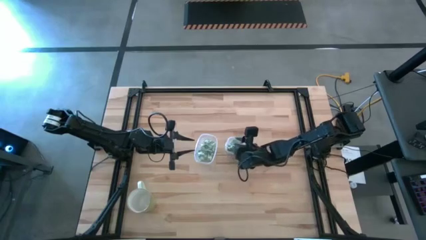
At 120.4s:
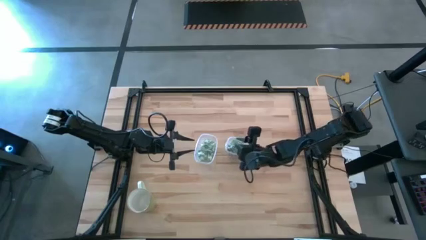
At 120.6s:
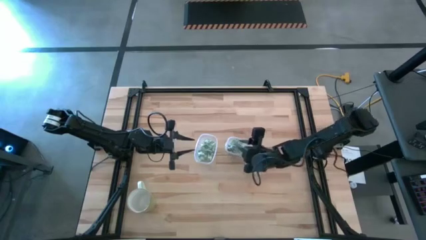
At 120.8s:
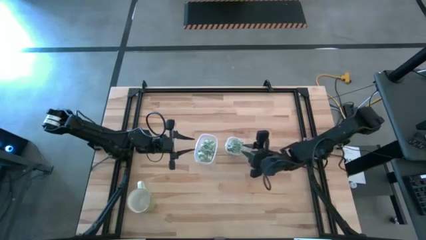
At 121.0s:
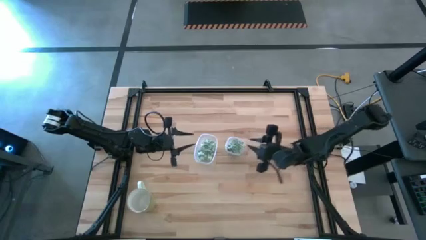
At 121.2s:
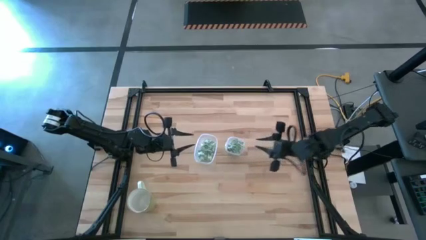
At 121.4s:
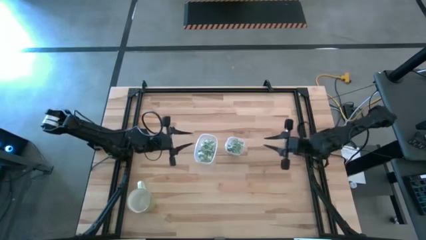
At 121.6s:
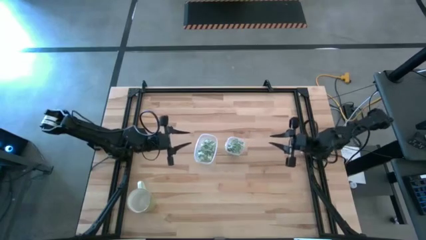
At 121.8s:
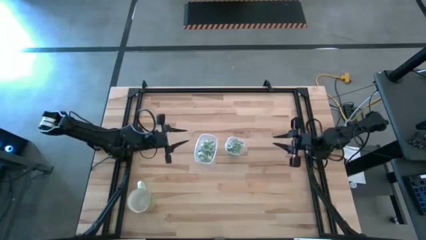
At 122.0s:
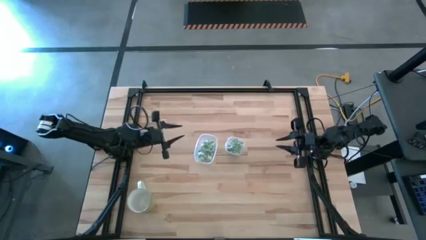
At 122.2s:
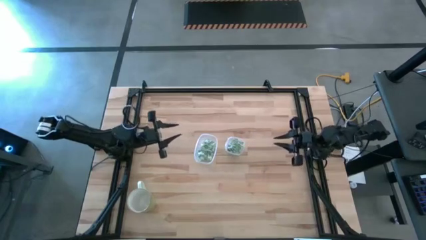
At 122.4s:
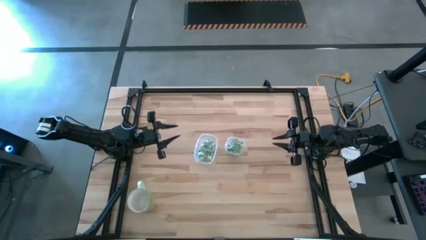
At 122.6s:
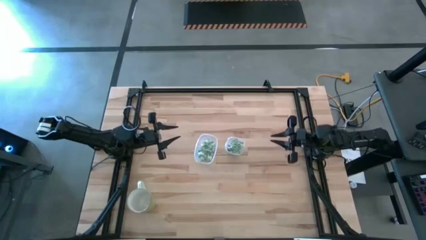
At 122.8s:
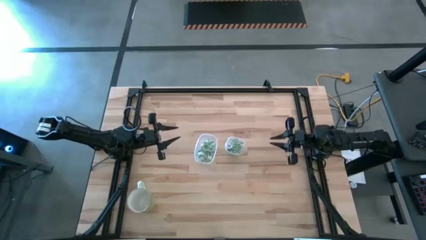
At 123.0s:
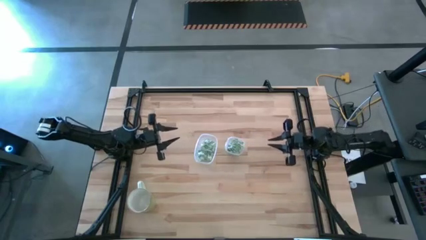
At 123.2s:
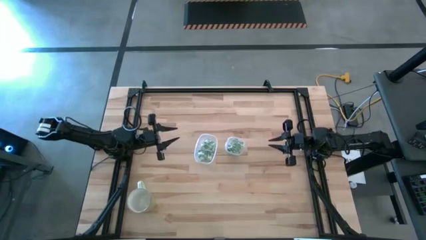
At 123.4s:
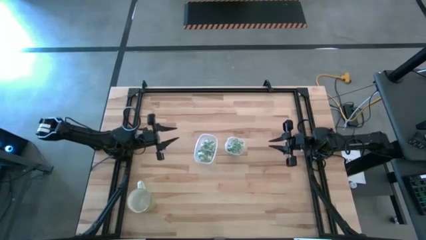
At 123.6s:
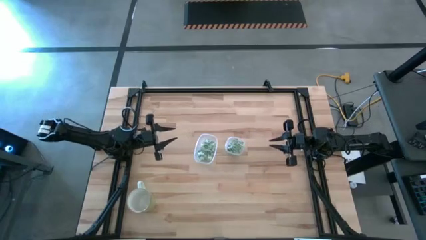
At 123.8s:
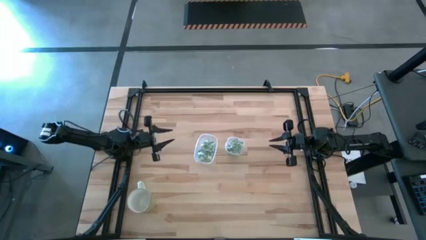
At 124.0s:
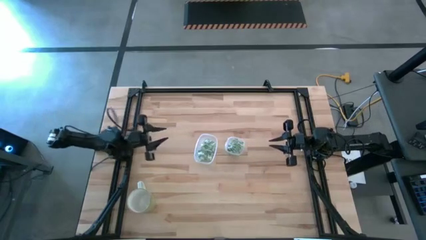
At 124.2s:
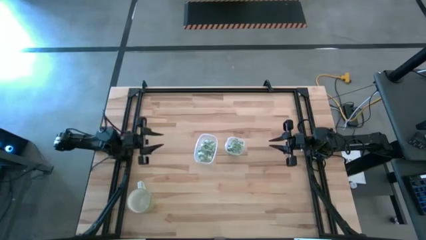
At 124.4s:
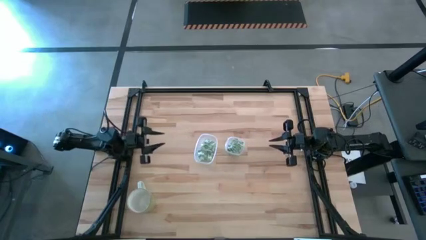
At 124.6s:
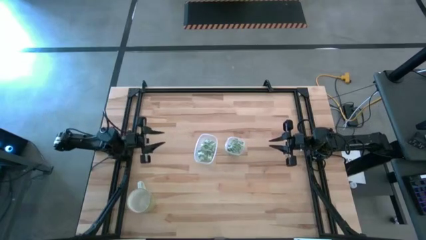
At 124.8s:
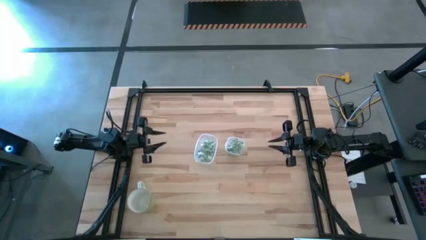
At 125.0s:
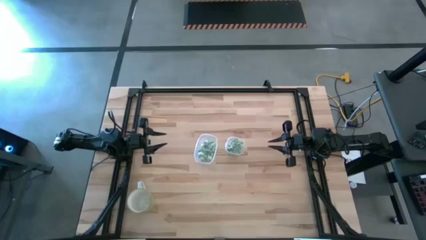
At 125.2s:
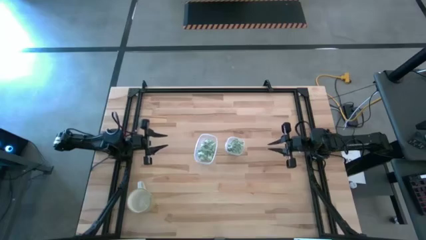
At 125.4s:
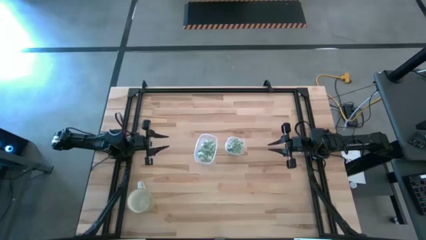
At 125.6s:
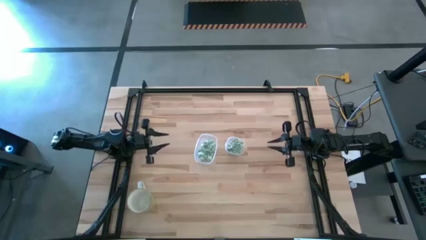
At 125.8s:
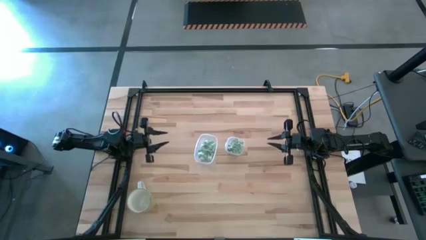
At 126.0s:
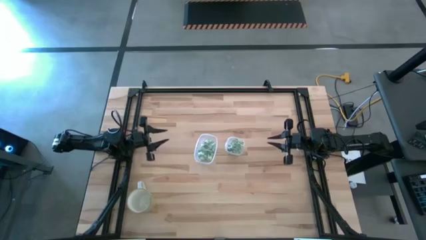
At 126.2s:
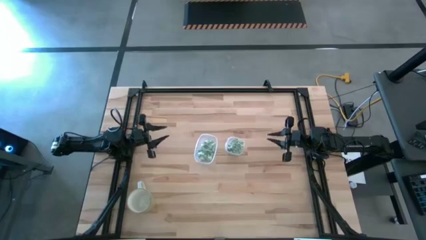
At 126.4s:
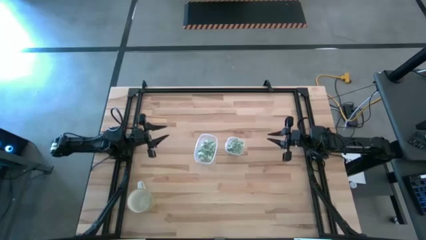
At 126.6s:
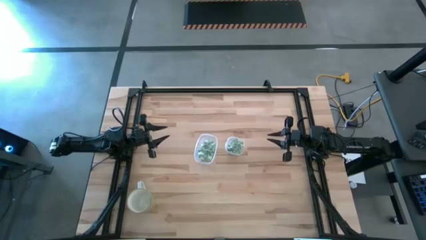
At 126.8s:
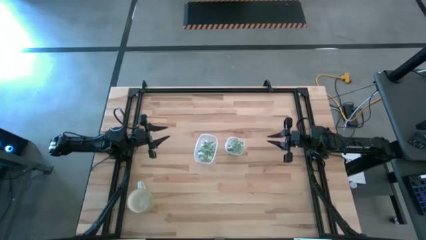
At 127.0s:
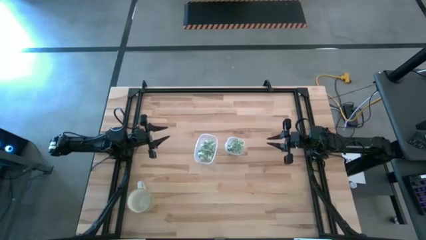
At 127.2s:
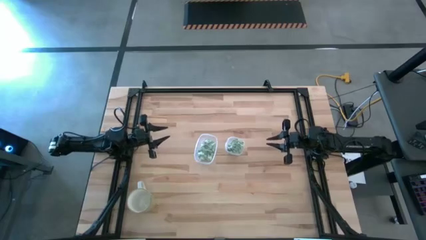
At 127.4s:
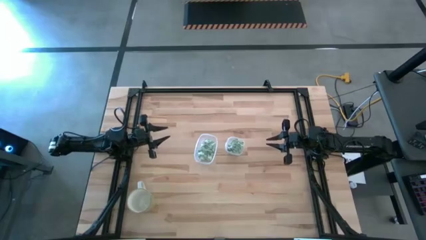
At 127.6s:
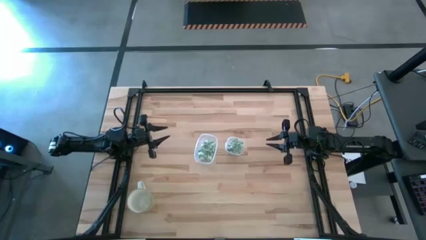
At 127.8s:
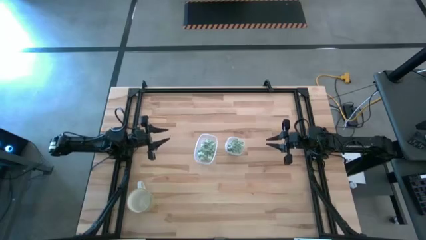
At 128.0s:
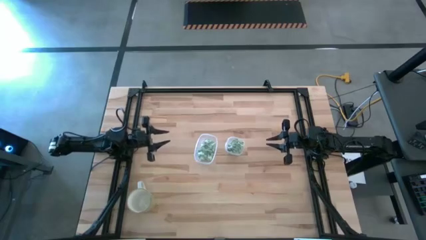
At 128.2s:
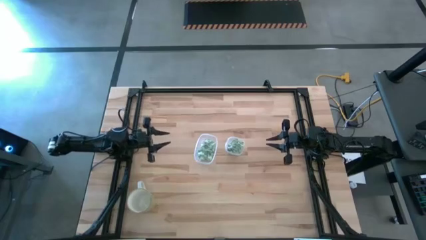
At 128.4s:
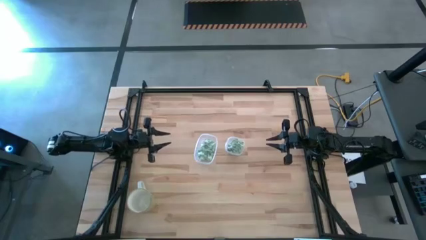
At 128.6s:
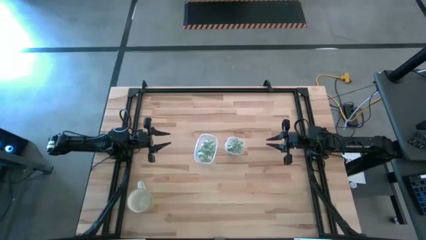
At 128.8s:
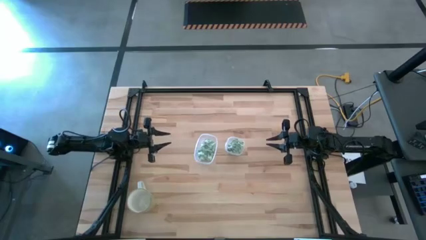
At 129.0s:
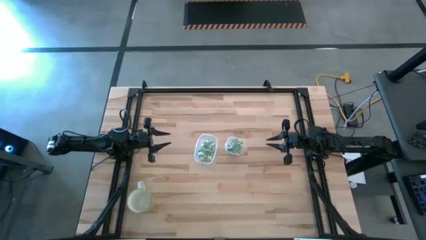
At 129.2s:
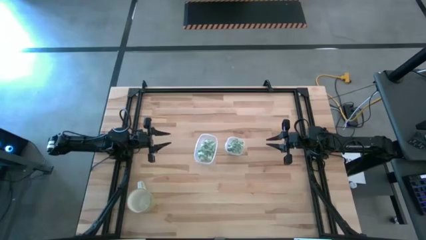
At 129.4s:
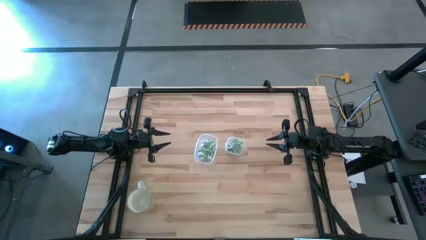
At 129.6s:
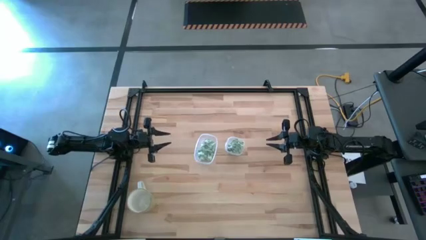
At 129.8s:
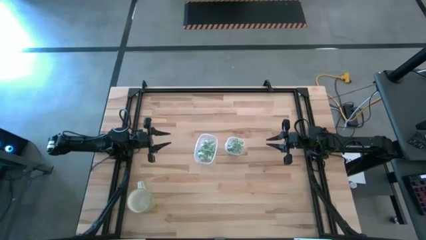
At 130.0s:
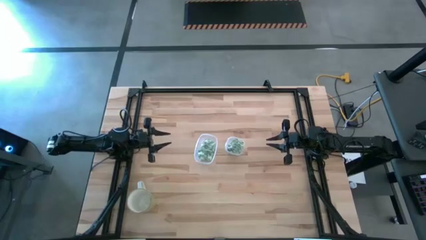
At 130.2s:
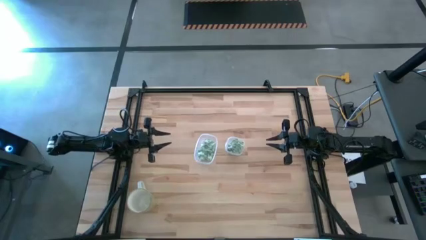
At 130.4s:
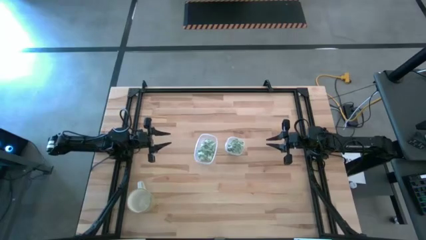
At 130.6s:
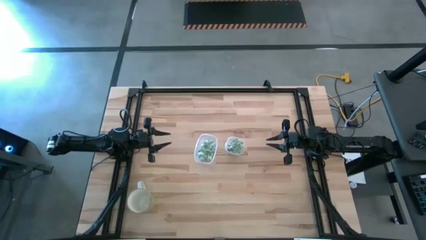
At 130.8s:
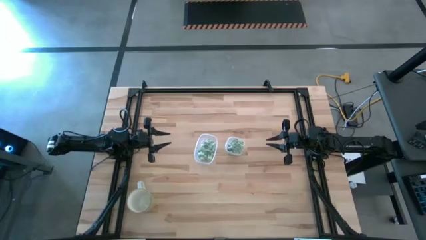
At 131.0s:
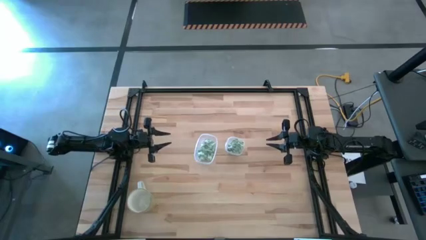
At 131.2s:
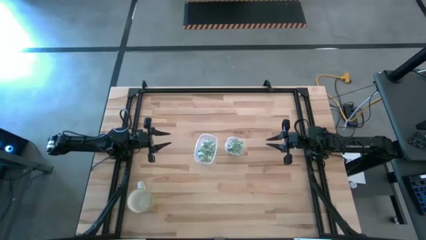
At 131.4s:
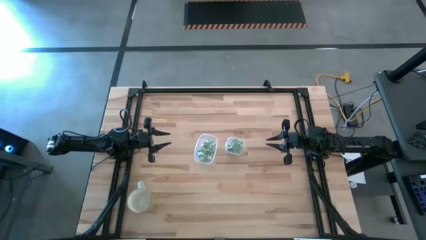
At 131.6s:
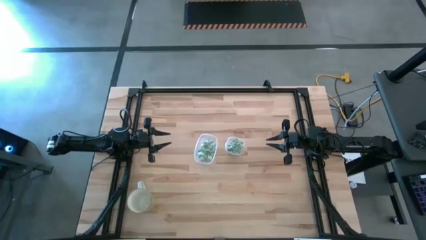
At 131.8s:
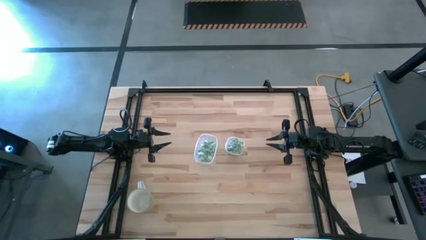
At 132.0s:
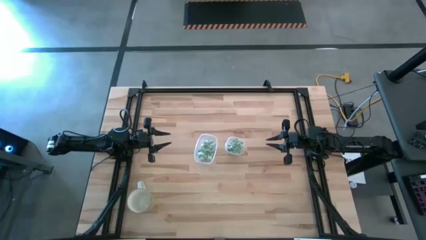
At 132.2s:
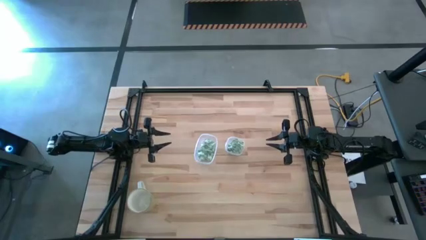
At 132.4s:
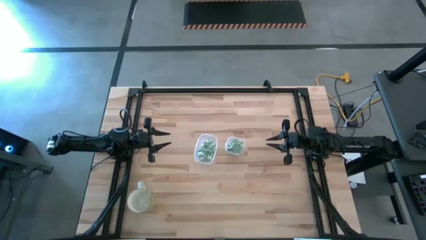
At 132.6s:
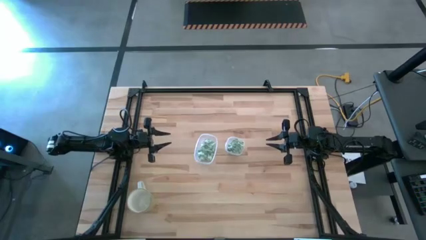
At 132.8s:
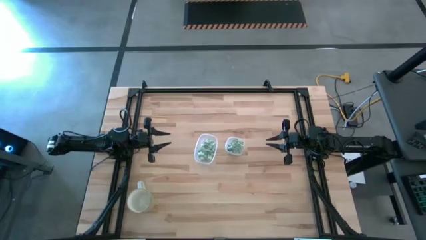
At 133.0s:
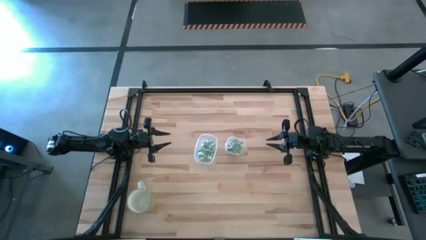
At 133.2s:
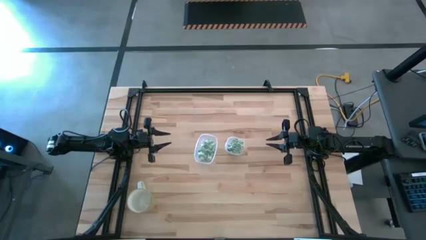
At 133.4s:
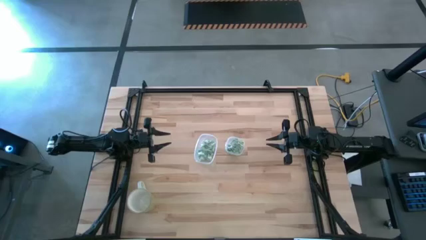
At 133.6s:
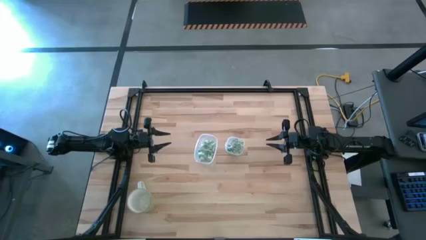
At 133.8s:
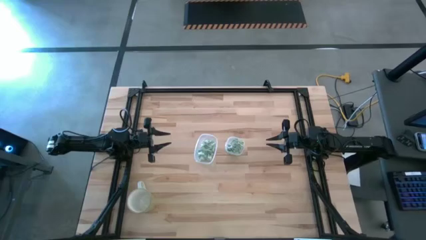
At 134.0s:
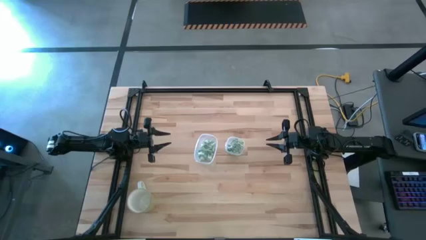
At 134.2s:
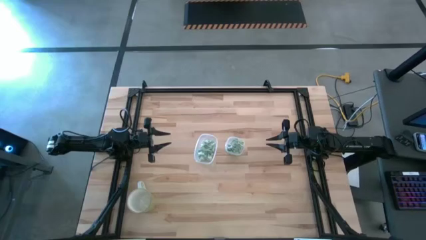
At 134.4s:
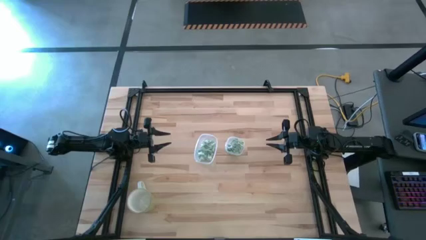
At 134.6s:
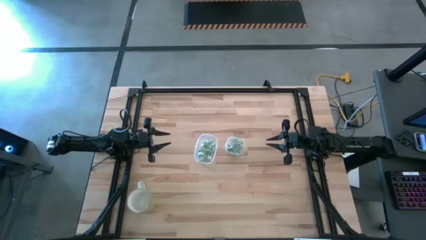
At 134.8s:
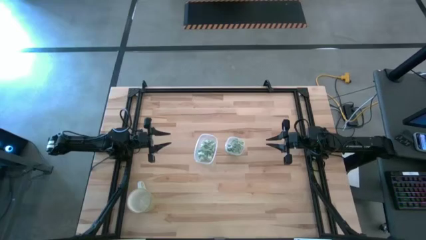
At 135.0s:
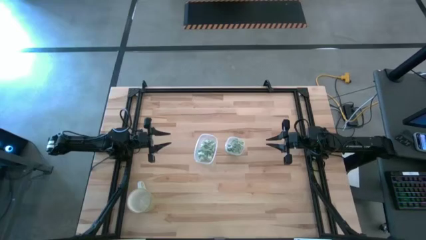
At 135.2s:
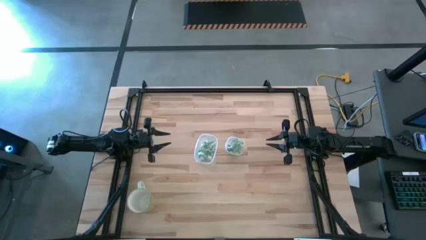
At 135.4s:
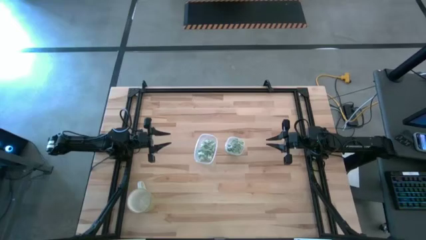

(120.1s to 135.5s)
Task: Pick and place items into bin
Return to Home Position

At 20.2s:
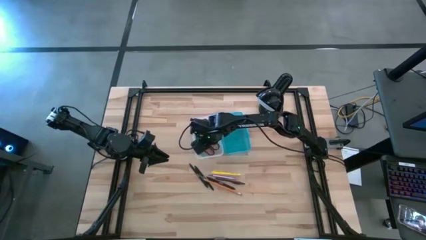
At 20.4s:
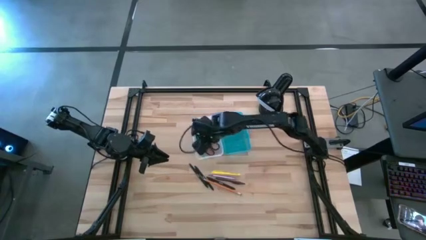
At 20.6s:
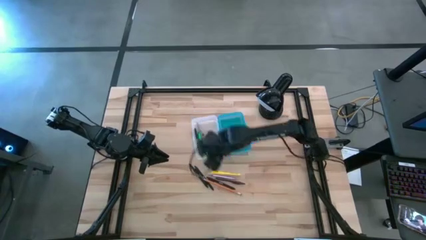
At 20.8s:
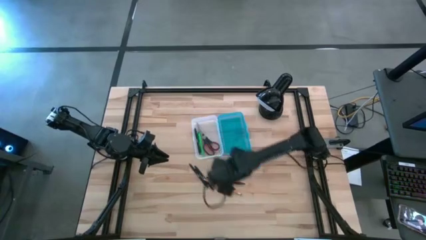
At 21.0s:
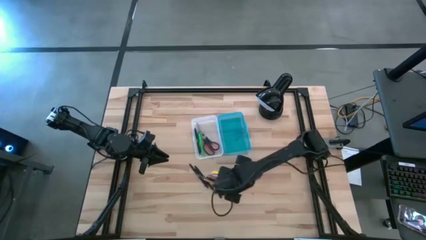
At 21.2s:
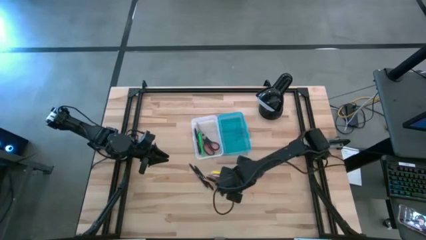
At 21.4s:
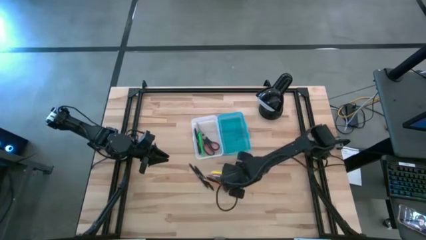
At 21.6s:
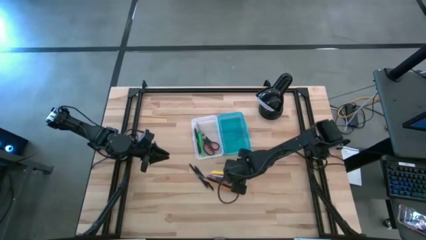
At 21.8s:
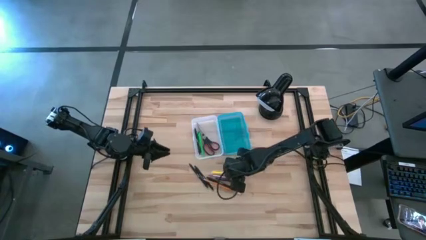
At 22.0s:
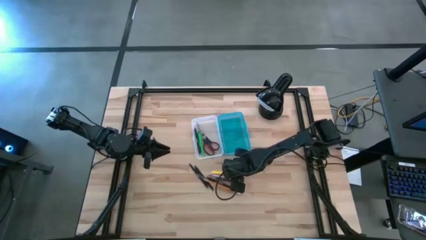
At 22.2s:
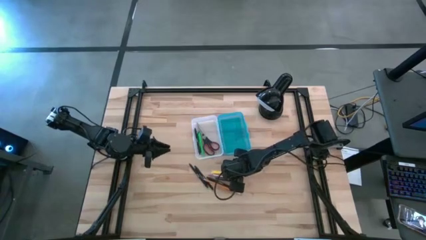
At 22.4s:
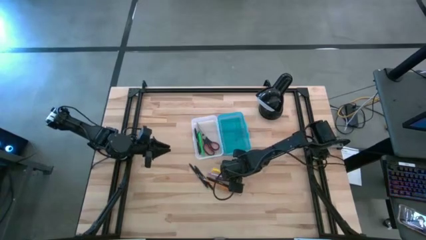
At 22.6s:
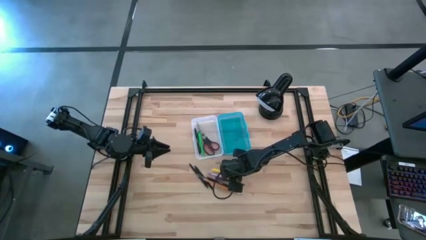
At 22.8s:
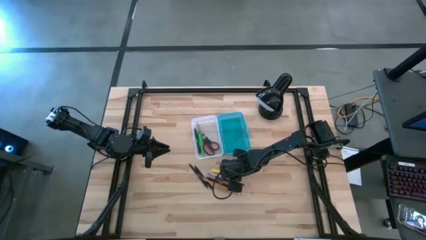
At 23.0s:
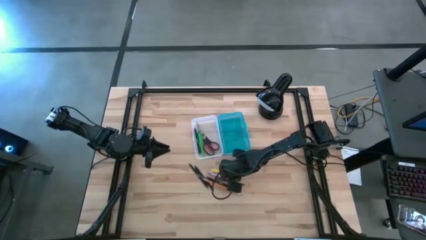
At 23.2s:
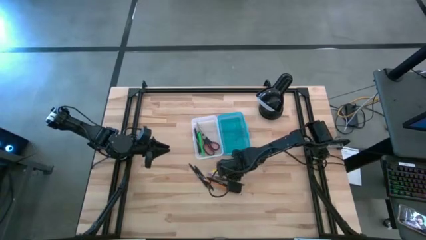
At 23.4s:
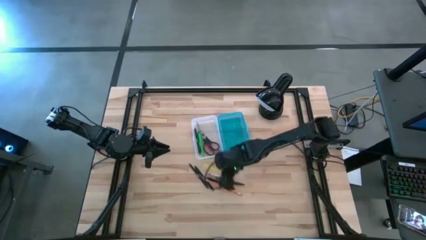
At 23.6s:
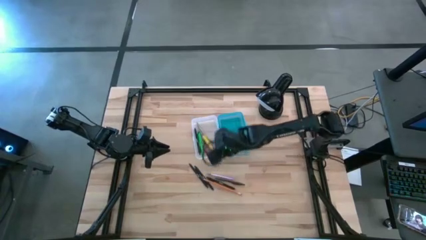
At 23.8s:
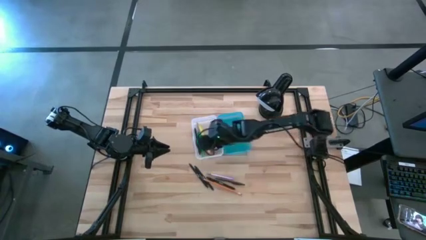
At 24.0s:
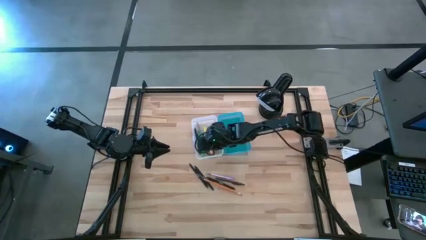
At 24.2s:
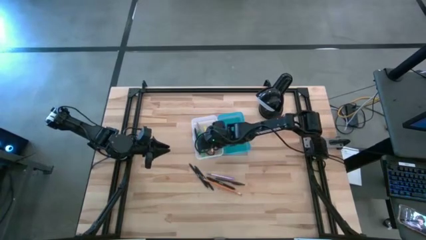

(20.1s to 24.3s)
Task: Pick & place school supplies into a supply box
Put the yellow pen into the blue supply box
